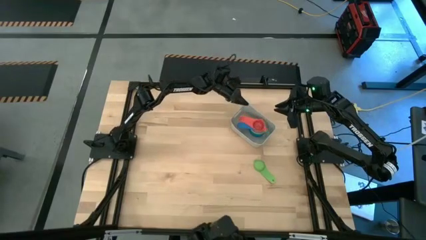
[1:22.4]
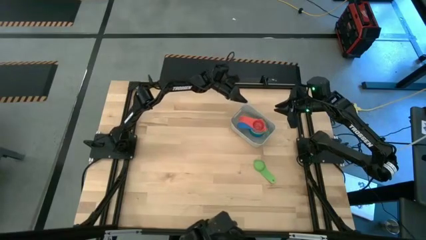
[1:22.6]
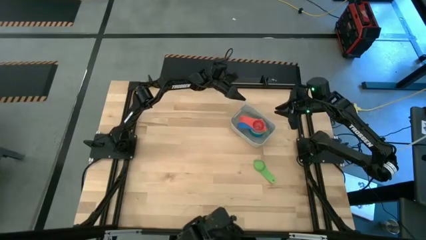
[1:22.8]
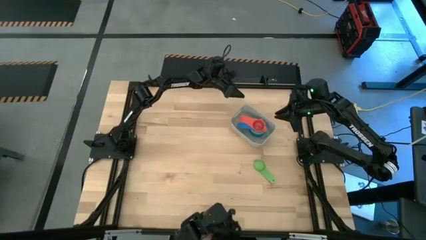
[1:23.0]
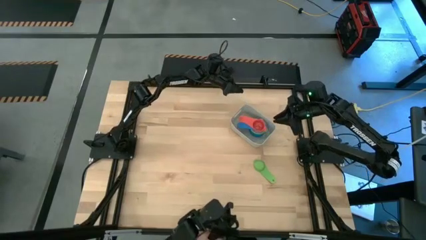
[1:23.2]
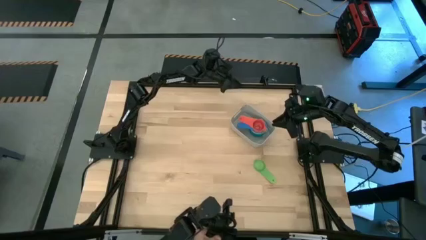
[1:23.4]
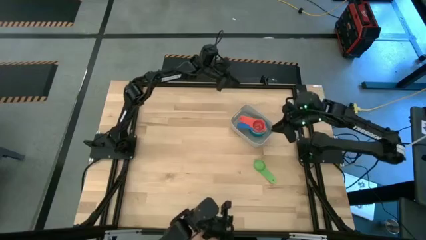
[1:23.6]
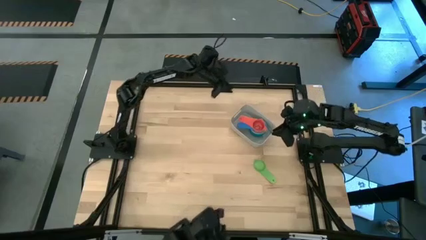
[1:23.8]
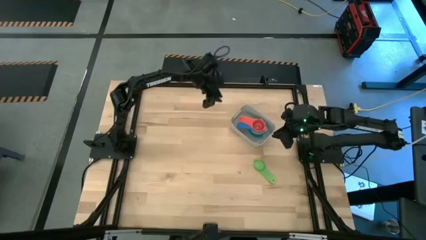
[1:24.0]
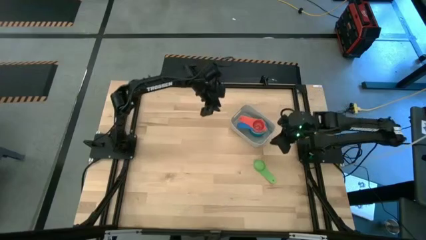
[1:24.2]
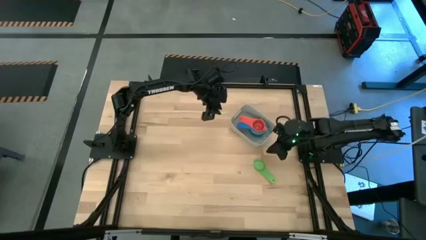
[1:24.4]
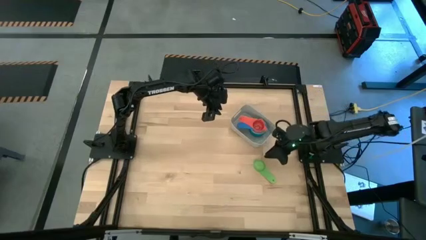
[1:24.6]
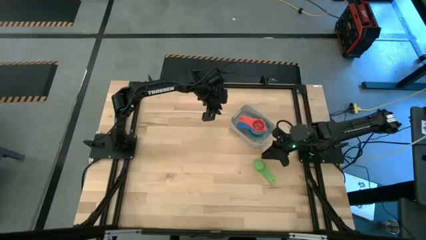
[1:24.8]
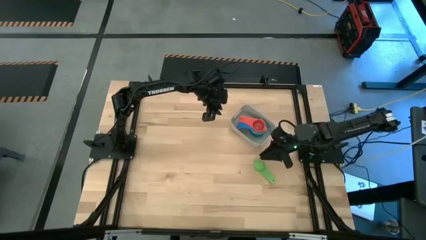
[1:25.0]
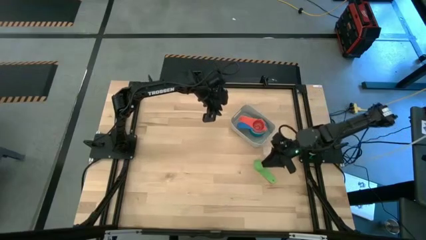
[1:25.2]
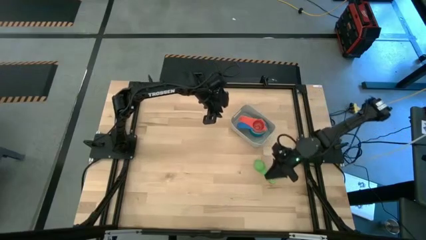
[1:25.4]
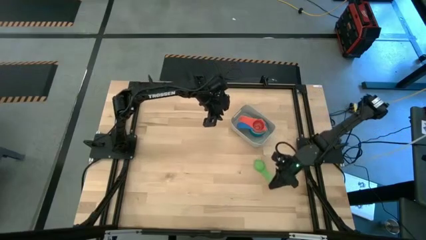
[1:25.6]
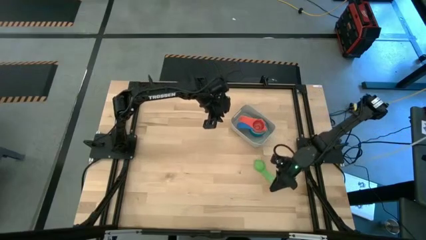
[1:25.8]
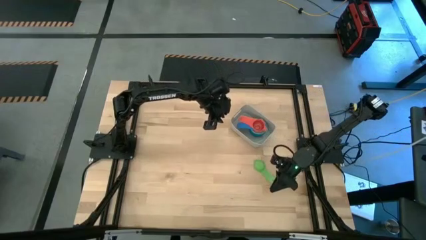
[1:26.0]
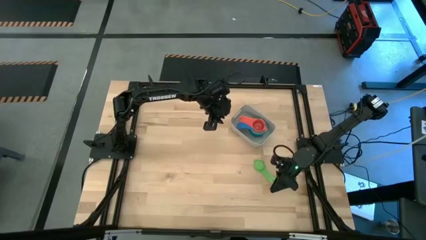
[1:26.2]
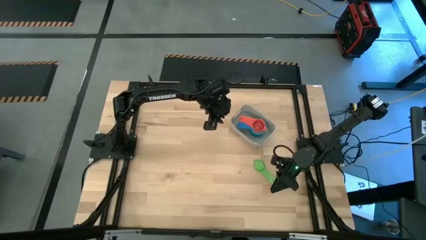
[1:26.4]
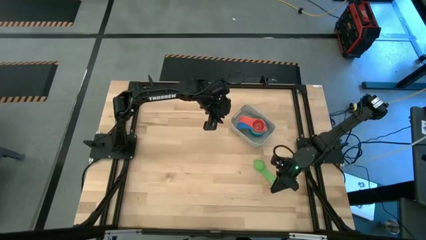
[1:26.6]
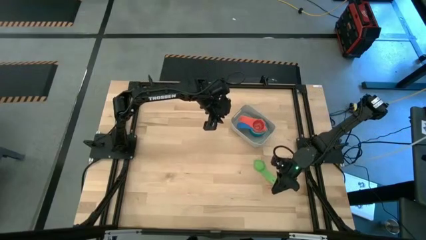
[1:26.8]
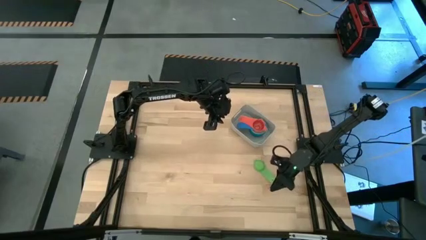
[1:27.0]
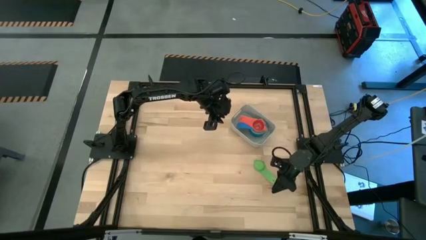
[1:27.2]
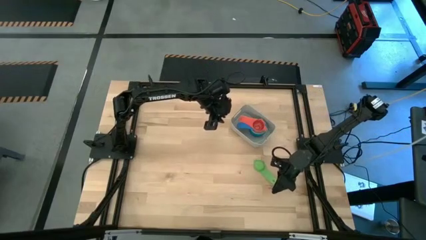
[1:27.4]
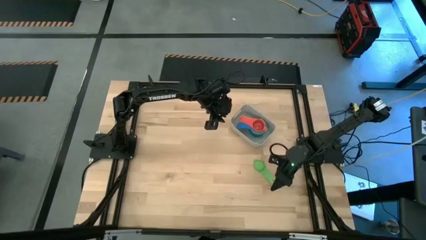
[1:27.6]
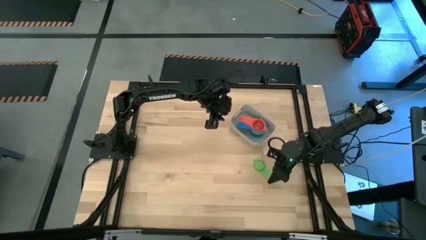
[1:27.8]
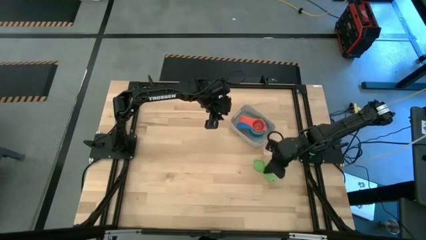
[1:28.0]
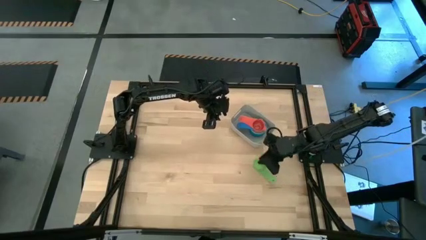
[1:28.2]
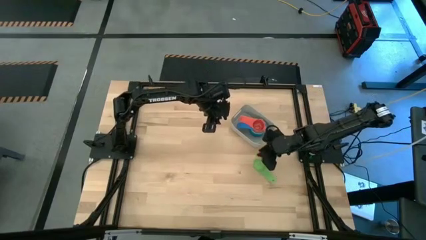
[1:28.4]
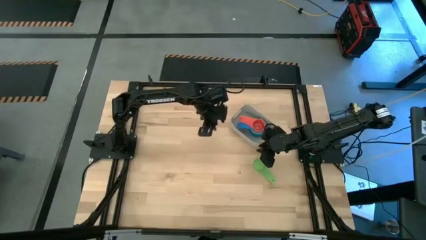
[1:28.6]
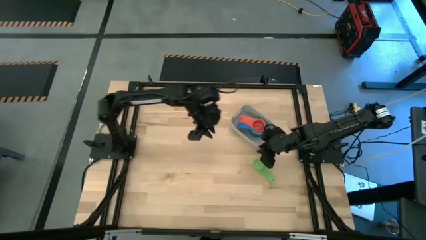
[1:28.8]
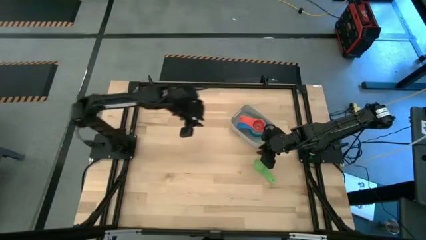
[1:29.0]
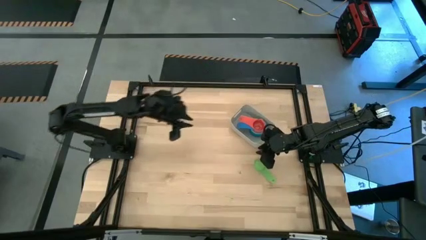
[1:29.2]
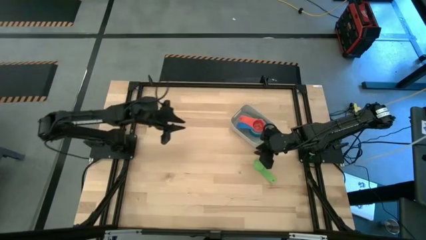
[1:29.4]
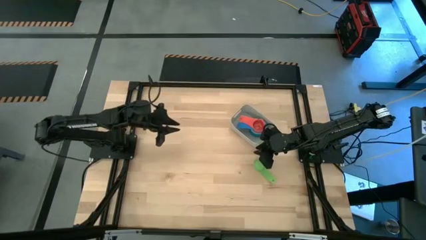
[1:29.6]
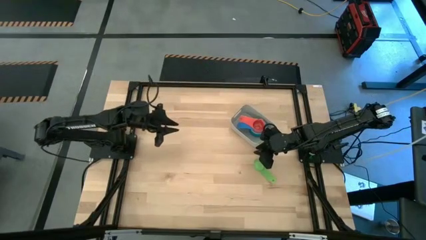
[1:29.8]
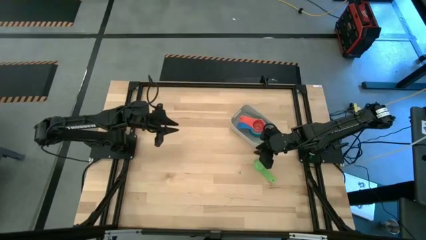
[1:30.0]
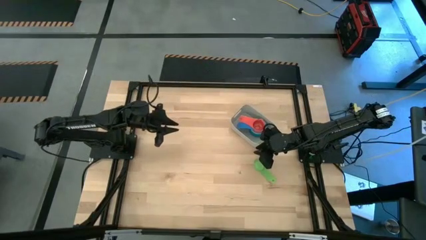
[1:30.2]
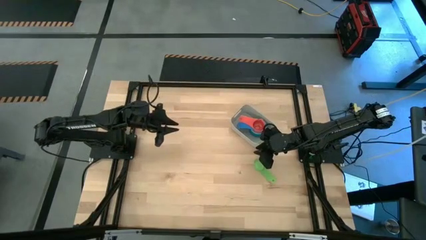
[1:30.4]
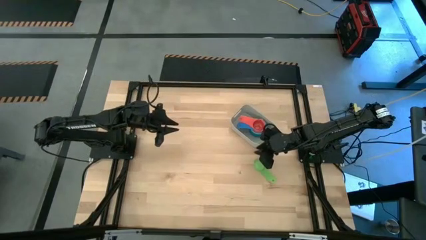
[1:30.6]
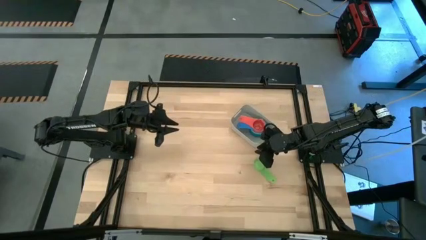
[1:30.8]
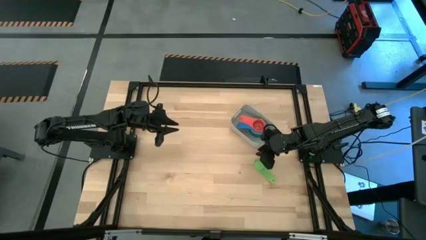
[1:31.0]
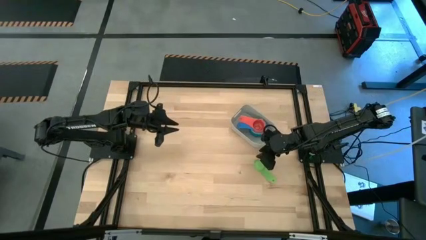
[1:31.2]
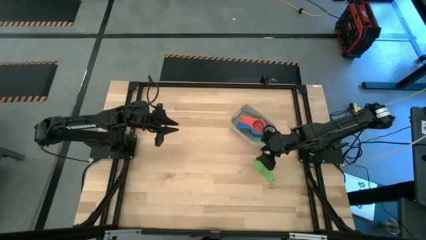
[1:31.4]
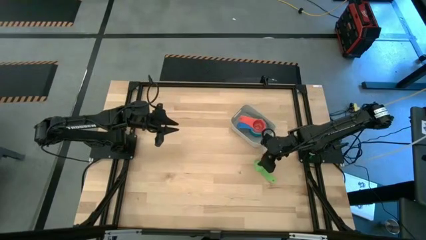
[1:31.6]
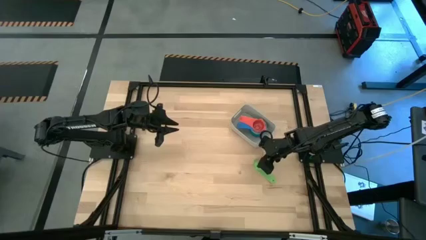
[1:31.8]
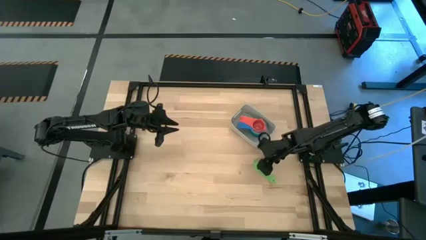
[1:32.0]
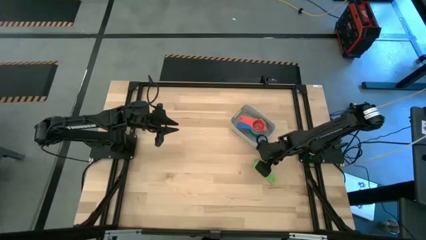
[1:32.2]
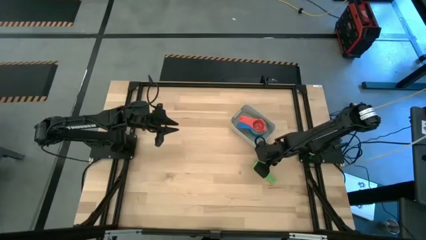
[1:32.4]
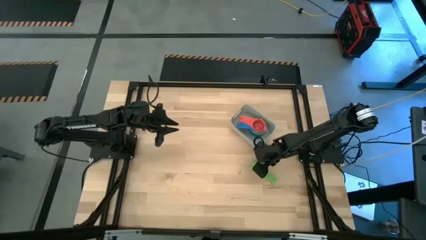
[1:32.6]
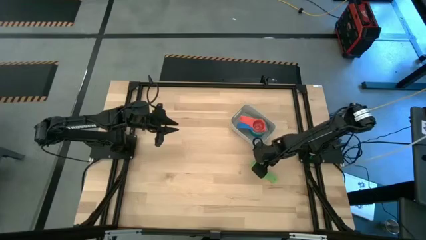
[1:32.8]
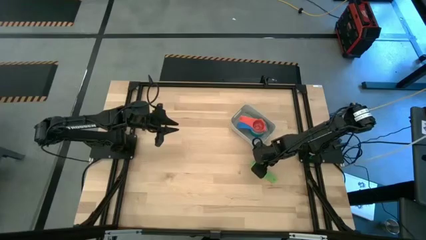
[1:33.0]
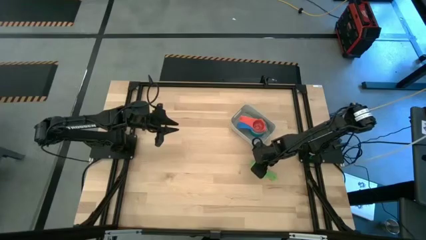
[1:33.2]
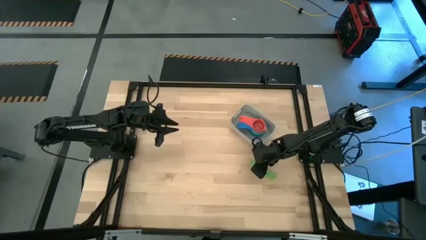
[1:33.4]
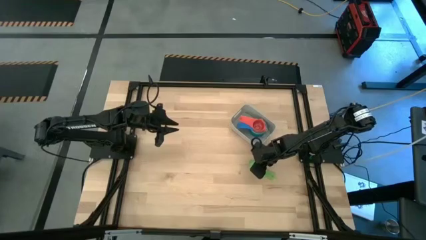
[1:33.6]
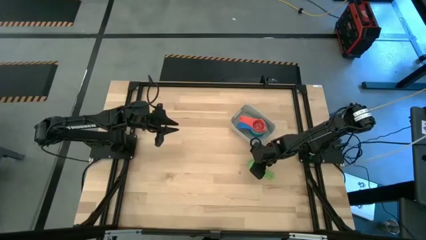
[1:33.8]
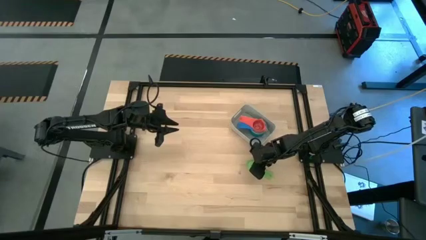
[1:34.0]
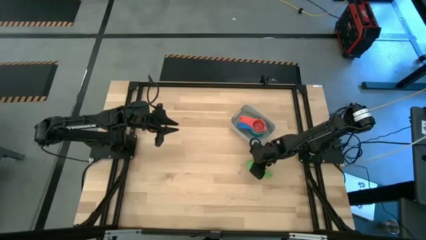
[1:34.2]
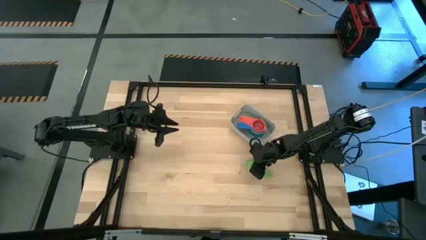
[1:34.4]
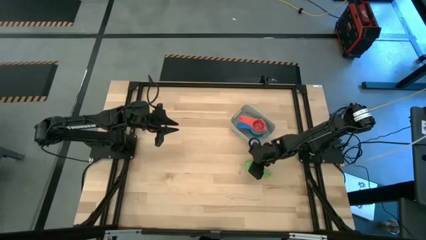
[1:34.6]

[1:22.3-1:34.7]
Task: Nest measuring cups in basket
Stack the green measuring cup on top of the red measuring cup in the bin

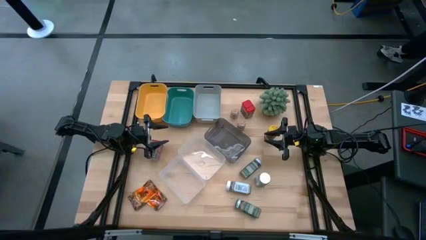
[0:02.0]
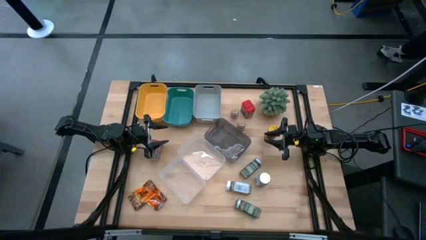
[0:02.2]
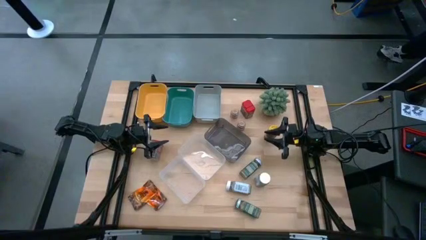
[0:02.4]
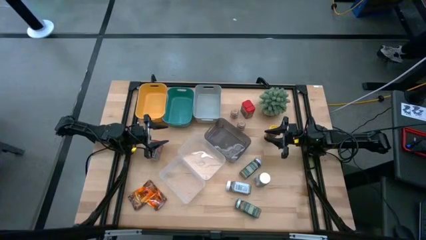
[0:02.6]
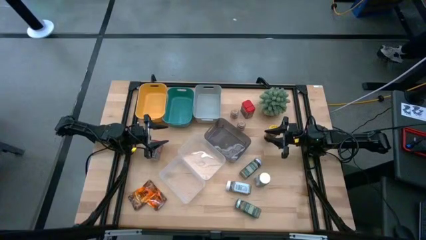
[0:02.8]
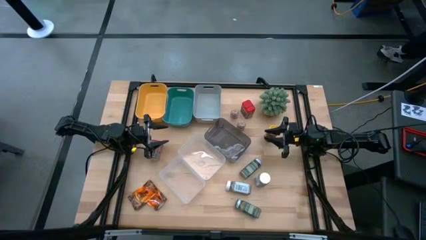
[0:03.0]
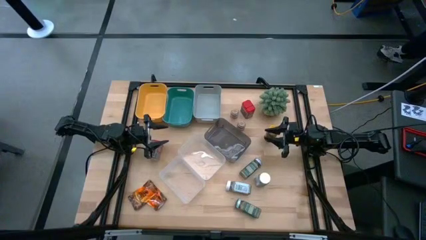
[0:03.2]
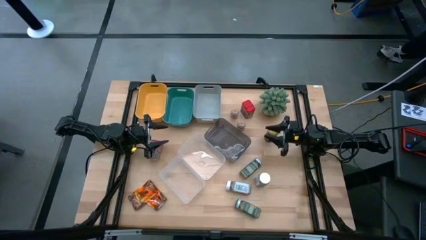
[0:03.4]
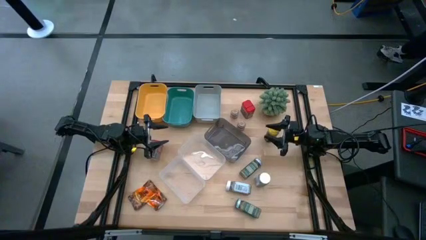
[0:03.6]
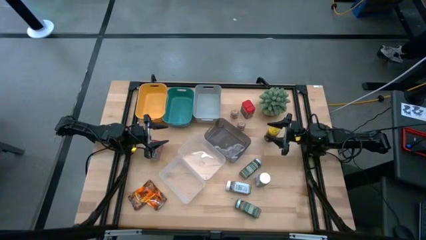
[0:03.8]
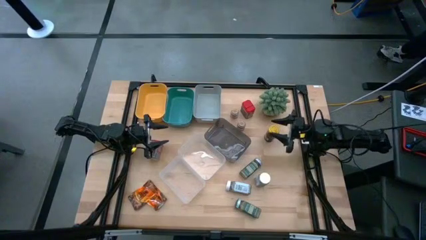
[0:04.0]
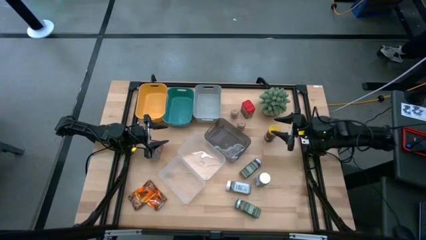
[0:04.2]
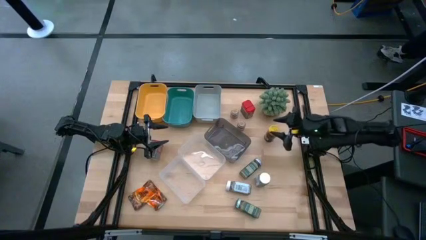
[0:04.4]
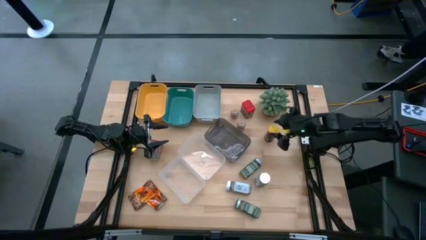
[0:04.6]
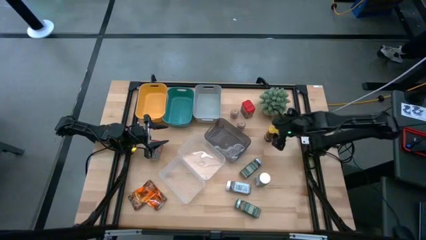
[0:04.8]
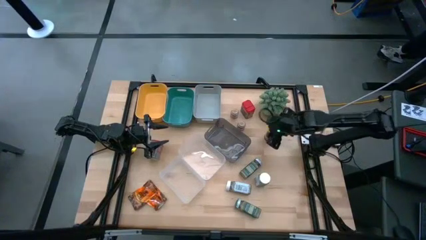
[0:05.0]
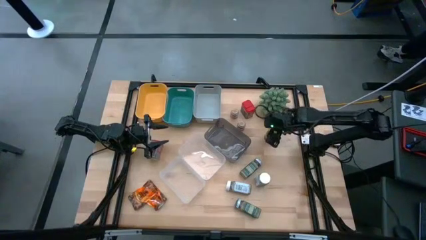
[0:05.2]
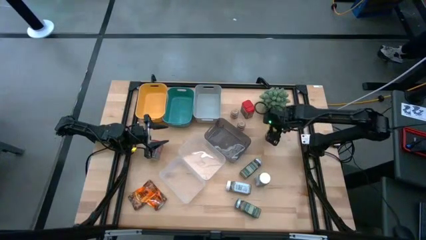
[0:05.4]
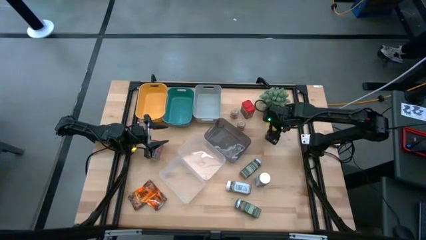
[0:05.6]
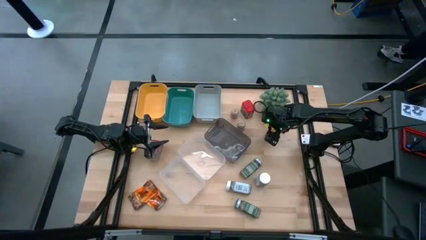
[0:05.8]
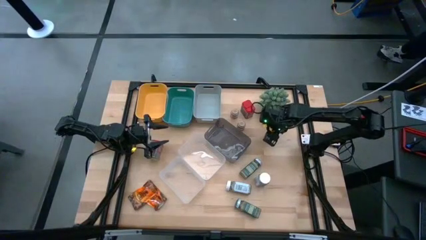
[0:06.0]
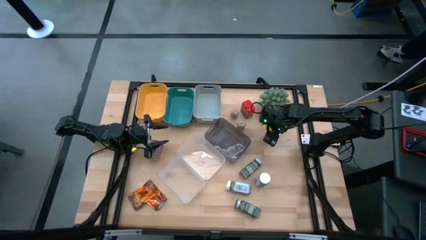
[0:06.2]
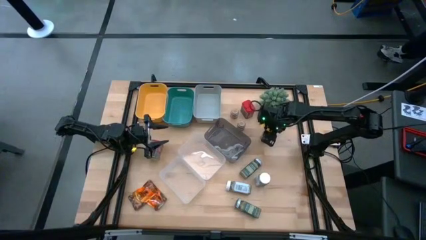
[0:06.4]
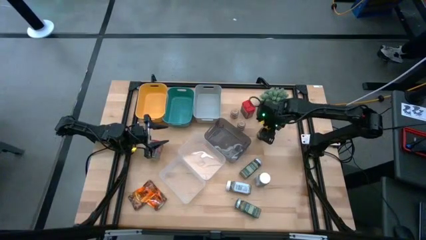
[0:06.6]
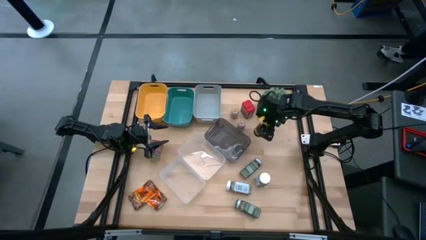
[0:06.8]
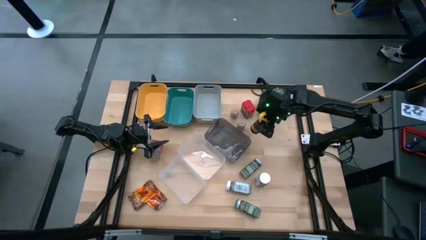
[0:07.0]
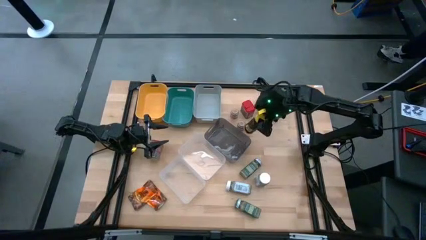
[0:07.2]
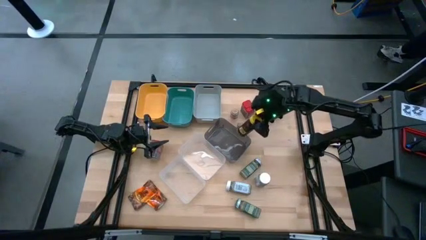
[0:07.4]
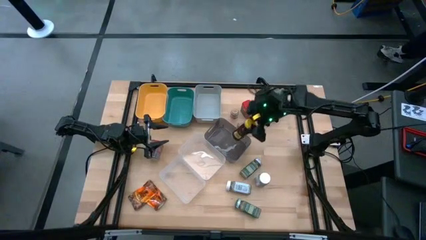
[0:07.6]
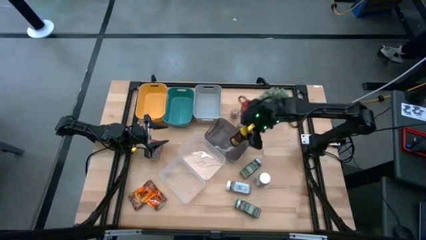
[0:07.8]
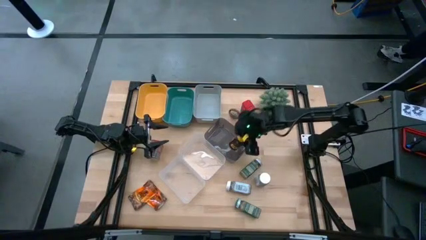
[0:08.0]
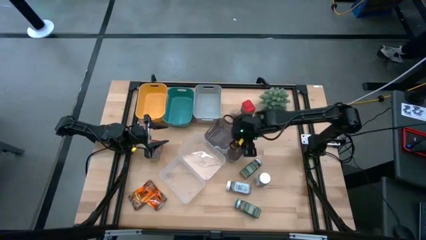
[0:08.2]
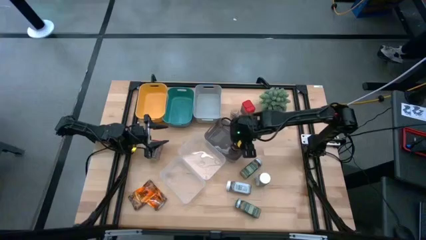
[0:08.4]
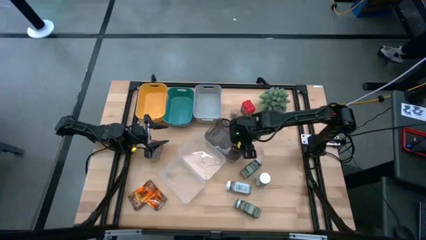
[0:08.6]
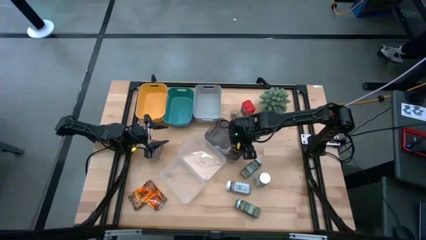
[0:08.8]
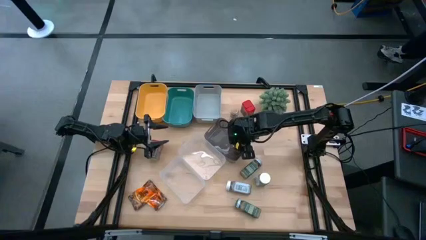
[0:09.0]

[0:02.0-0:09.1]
Task: Sort spices by type
Put the yellow seasoning bottle into the black transparent bin
